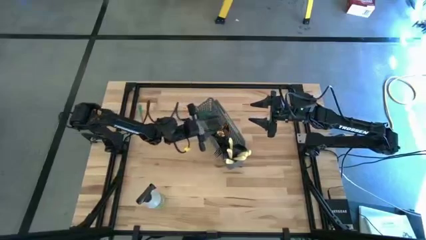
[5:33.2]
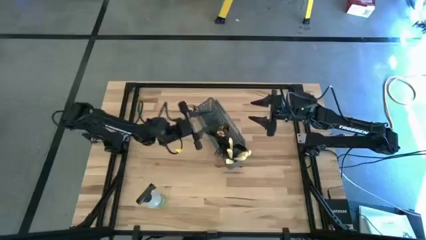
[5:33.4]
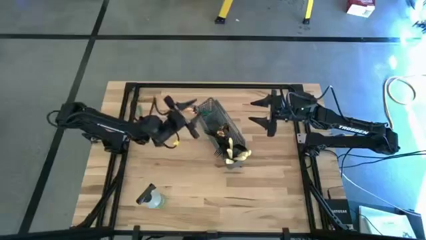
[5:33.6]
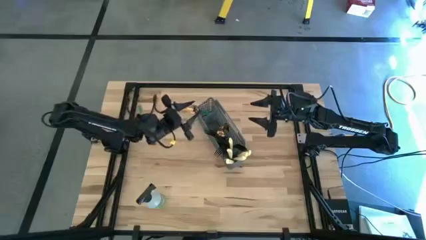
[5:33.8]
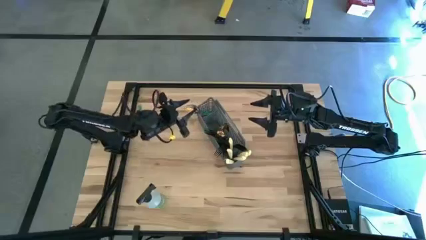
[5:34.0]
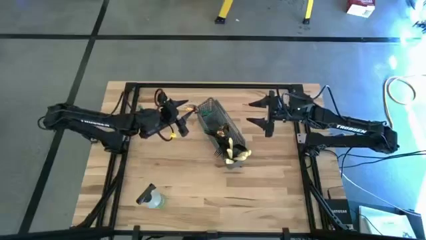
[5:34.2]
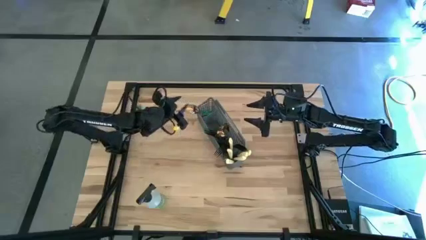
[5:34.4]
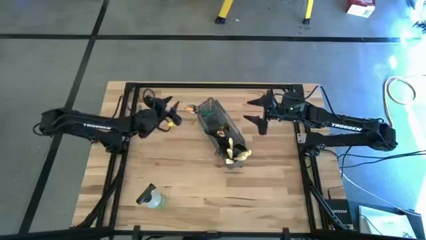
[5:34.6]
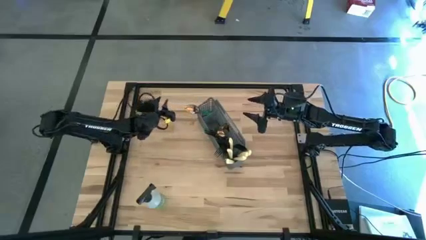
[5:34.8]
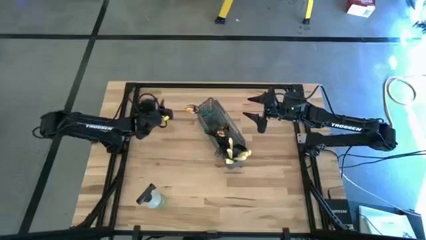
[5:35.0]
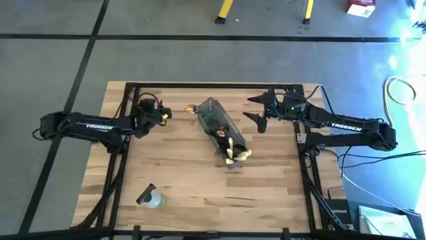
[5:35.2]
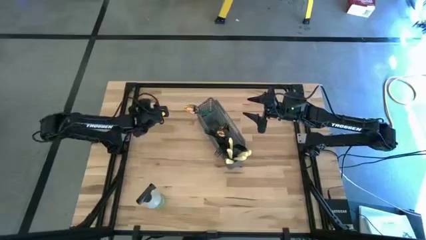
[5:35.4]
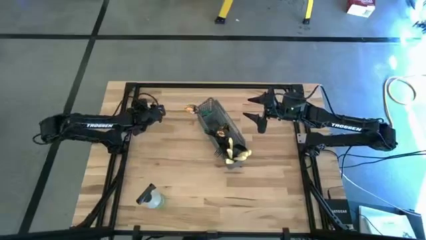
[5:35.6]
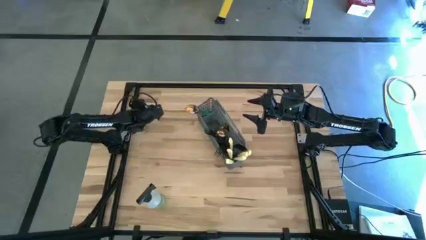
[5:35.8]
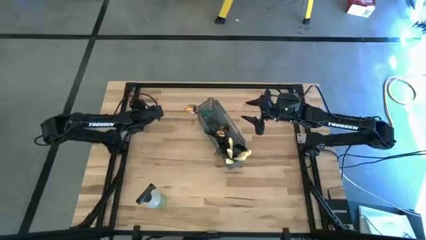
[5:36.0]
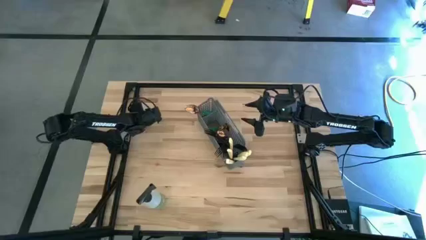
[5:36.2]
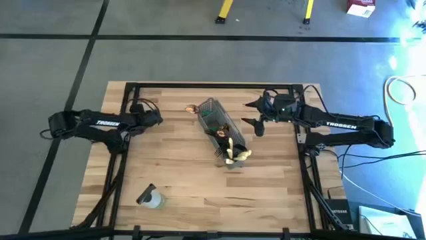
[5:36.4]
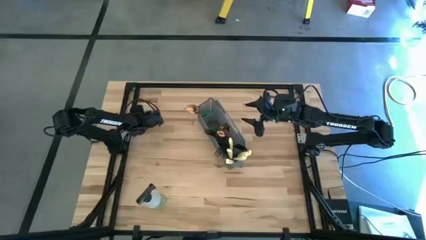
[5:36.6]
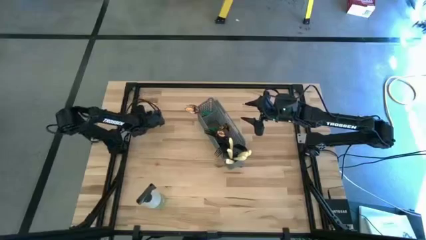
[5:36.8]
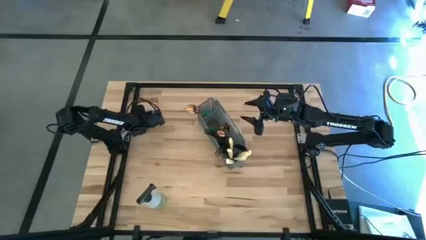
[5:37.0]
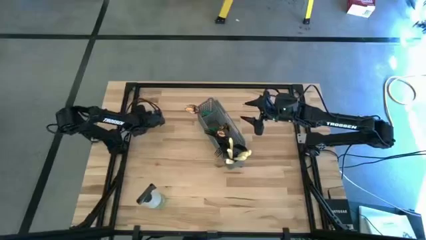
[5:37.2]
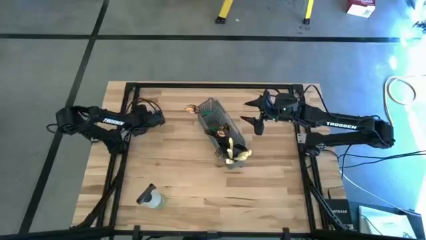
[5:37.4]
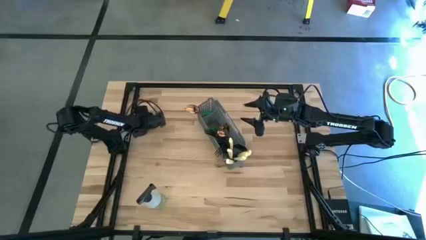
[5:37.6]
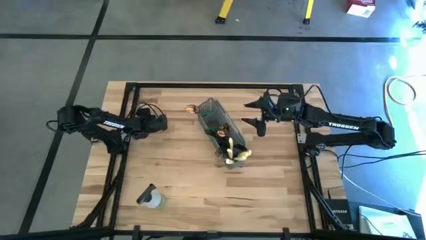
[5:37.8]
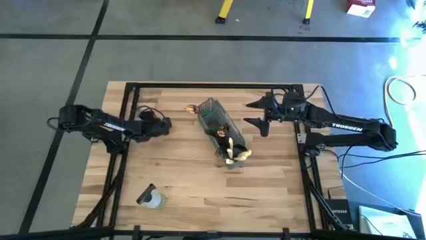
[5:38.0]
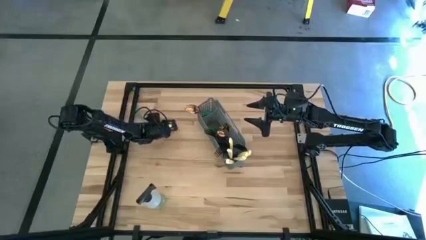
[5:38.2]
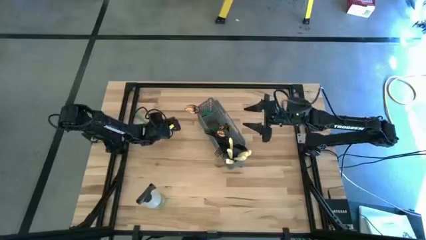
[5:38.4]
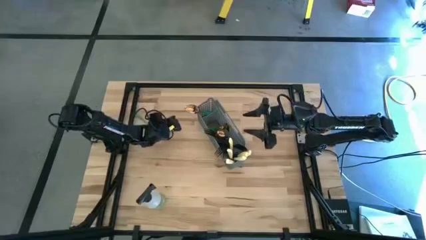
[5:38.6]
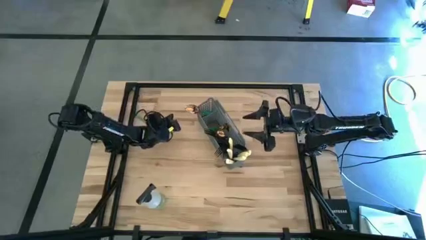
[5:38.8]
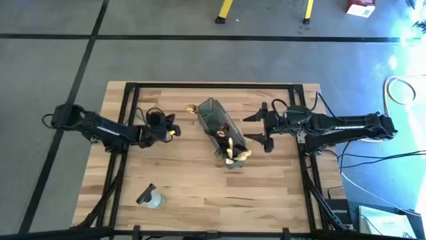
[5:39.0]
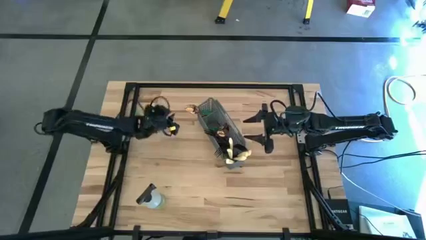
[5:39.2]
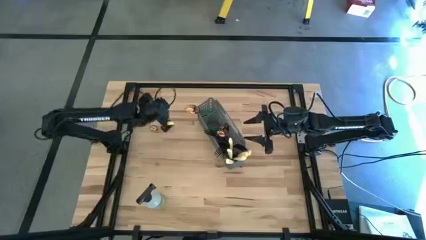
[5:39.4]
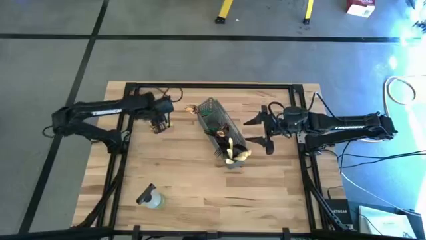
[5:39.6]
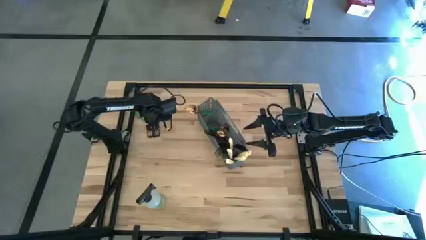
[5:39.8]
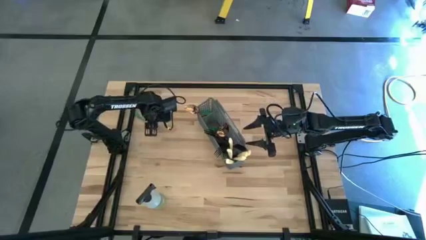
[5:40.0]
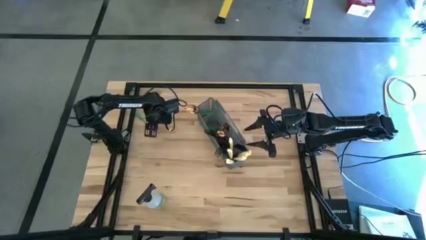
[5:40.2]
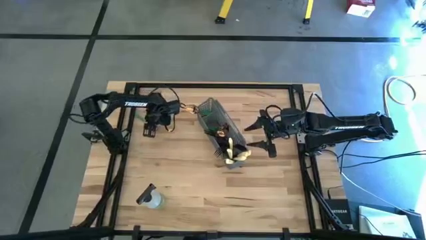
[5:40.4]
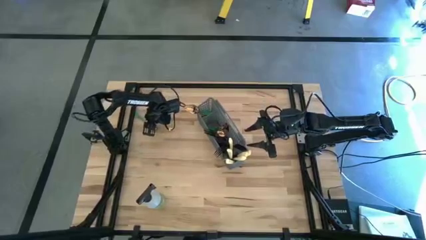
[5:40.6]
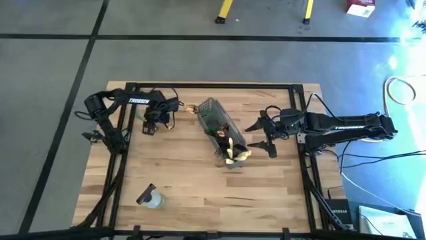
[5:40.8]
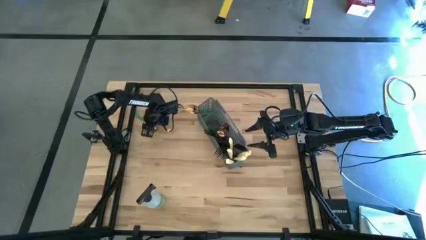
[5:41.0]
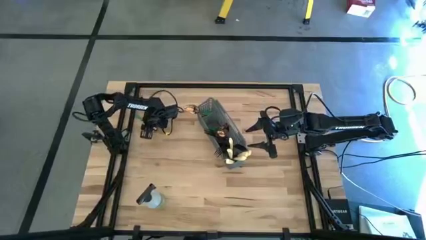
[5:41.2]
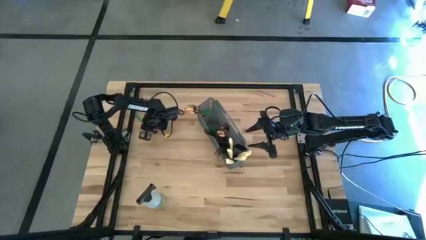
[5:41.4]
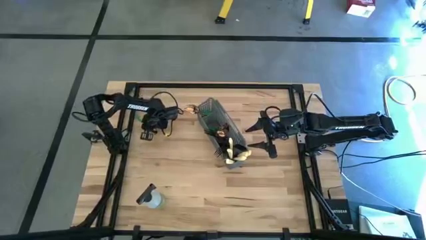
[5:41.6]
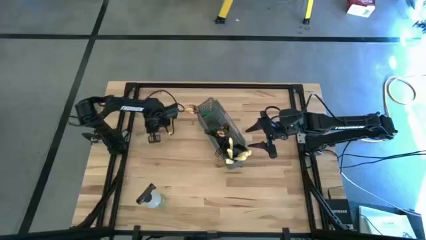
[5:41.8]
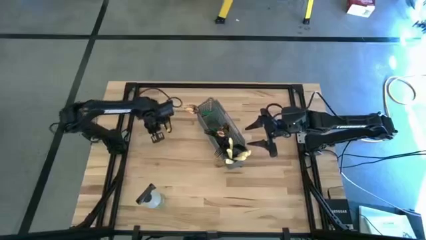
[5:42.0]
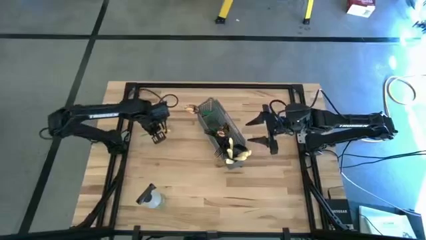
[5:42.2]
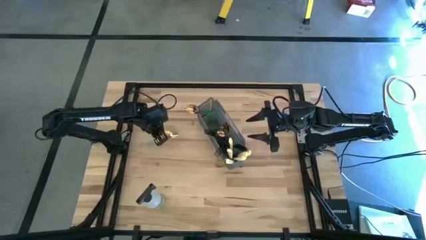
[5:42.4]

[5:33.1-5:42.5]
Task: Sort silverware
Put the gold spoon into the cutlery rack

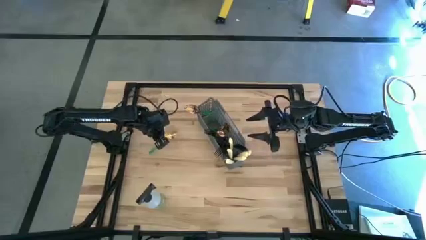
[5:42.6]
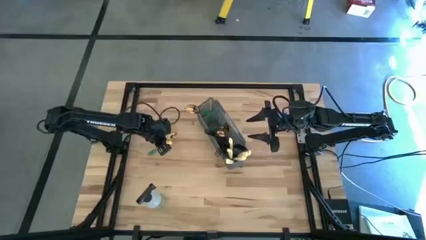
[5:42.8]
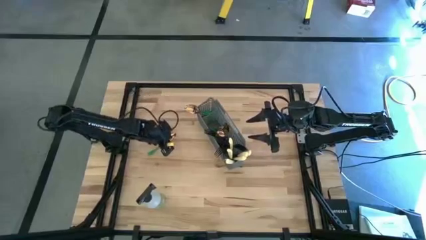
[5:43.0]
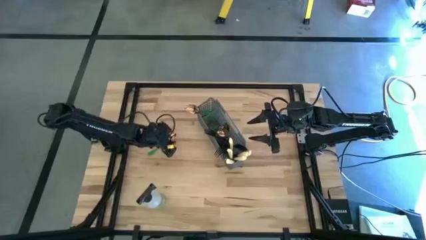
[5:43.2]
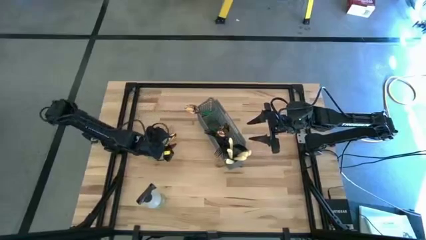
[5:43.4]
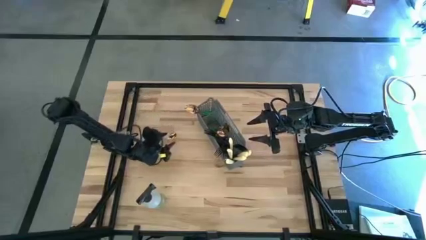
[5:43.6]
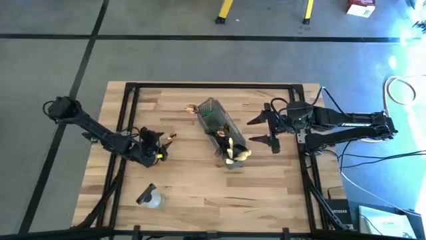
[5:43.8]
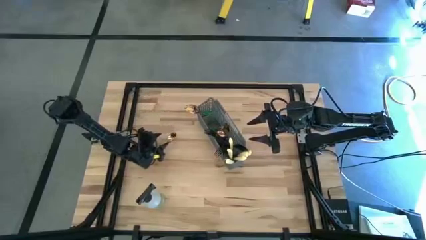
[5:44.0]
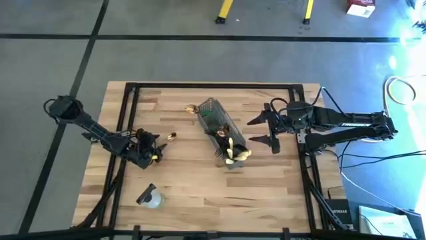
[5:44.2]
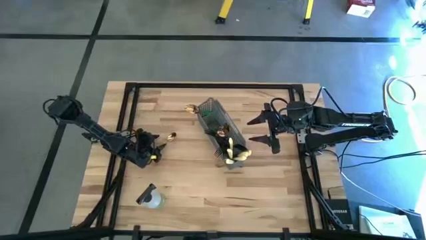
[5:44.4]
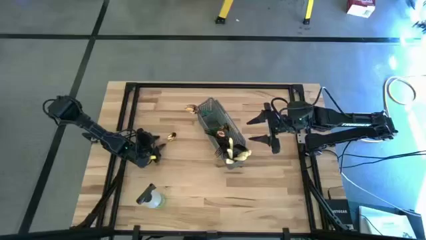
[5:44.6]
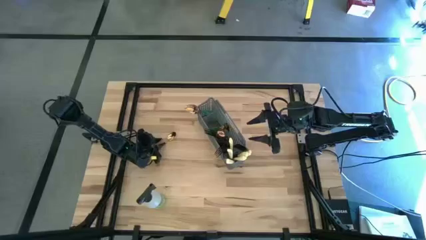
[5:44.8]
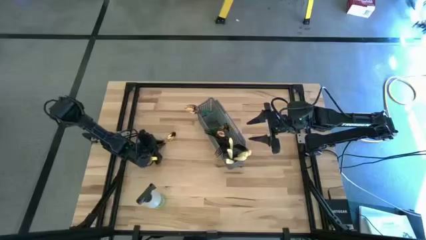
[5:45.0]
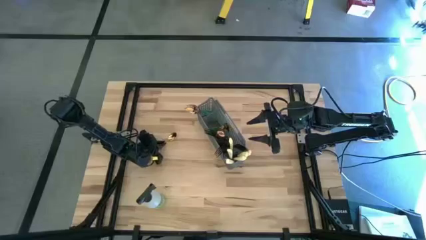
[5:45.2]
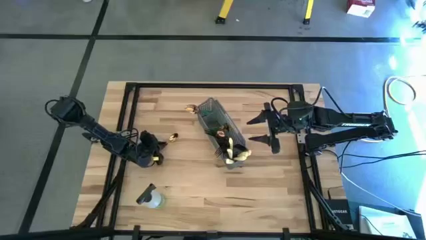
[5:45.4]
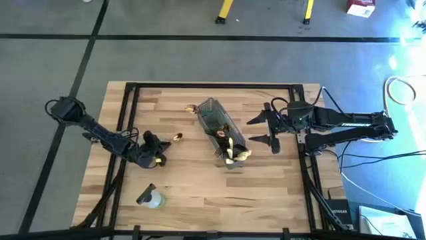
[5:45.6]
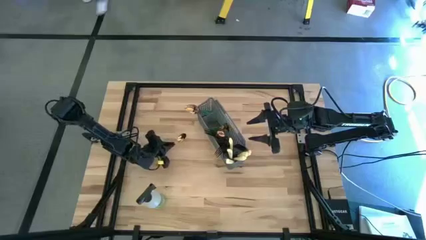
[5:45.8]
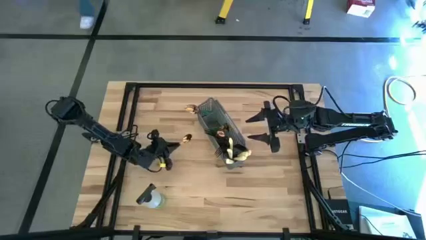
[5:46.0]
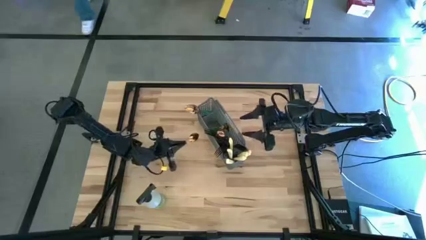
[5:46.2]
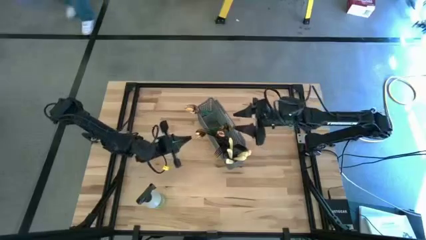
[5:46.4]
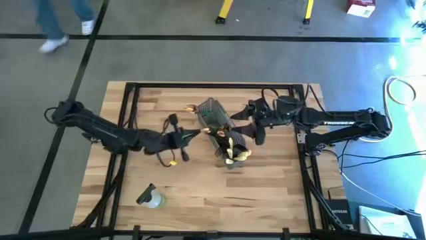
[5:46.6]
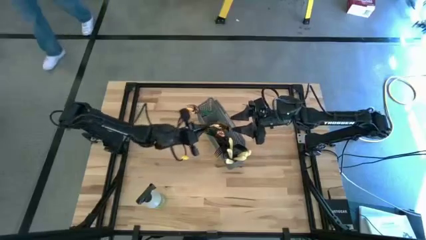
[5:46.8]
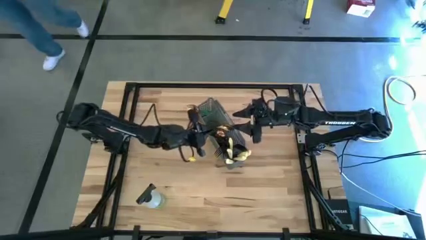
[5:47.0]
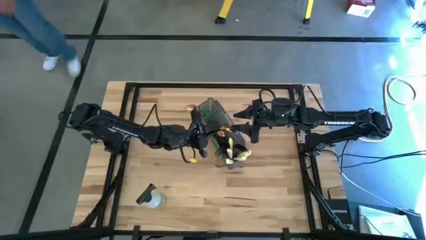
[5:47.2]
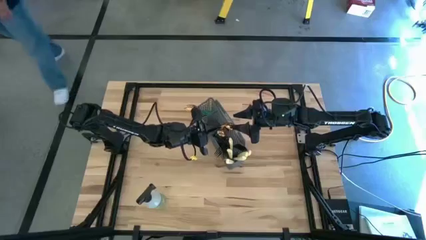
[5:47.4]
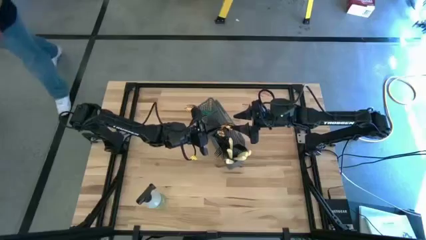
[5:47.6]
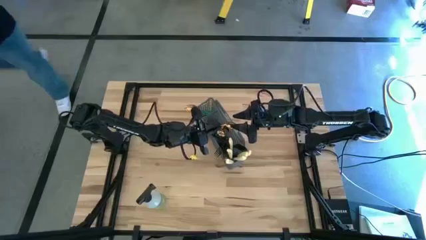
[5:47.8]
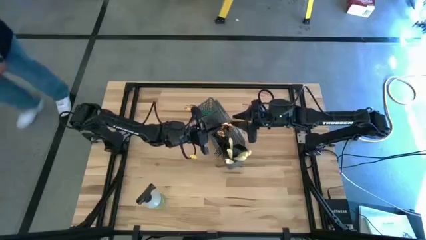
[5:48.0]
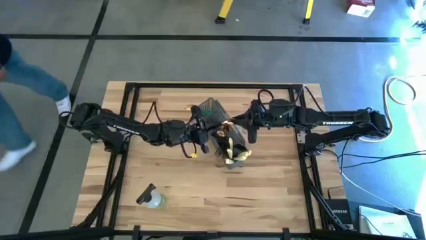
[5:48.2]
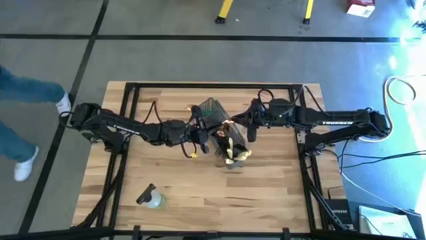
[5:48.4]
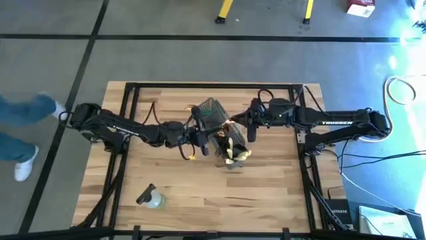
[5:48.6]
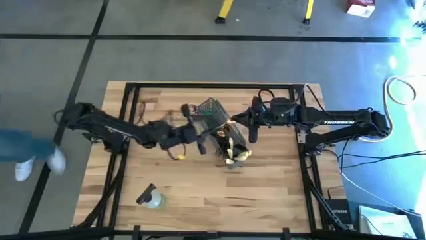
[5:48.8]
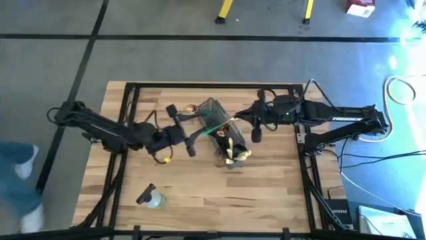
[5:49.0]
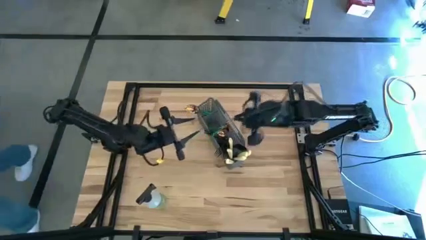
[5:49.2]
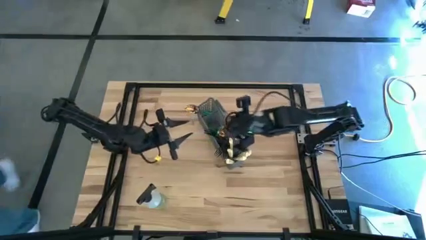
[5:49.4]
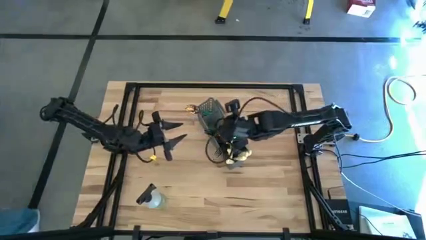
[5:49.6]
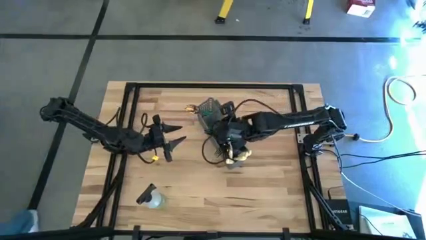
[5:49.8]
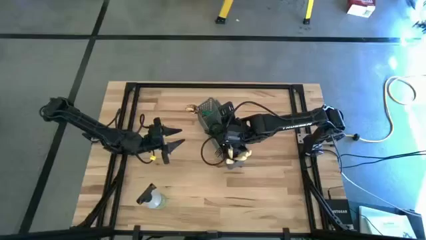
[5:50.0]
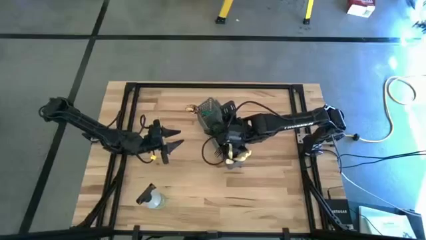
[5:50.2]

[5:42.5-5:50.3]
Put the gold spoon into the cutlery rack
